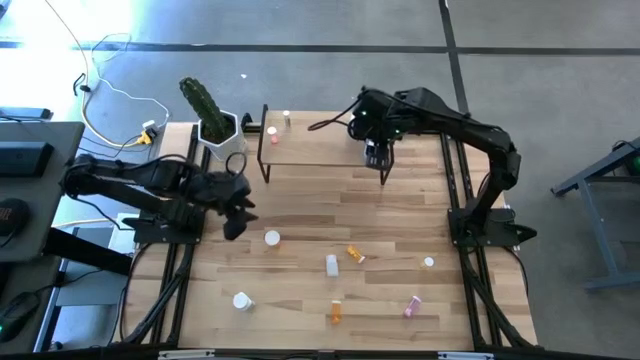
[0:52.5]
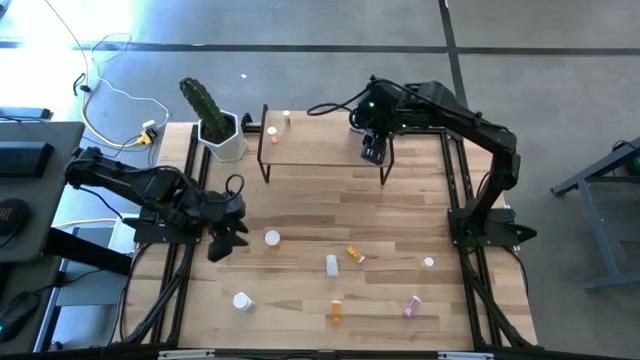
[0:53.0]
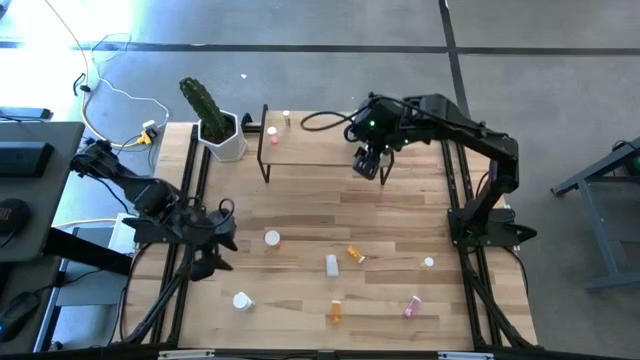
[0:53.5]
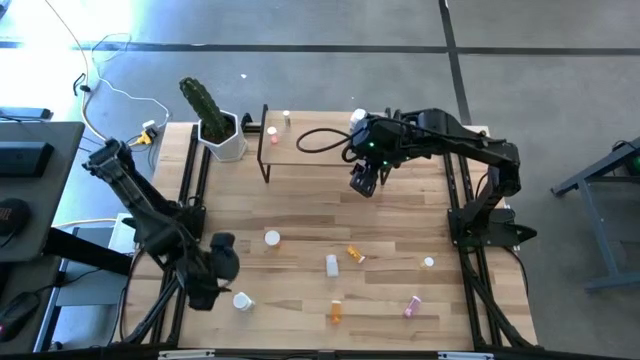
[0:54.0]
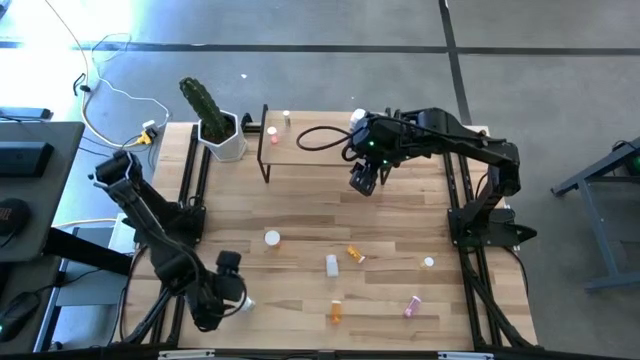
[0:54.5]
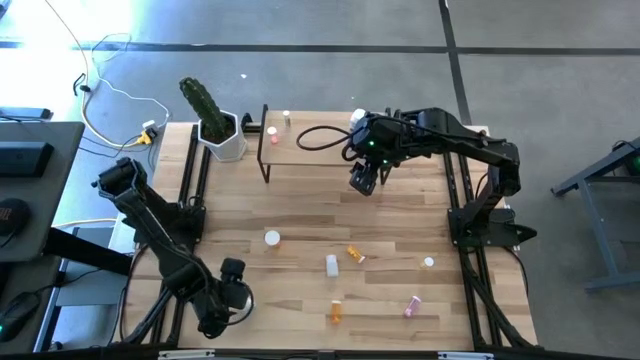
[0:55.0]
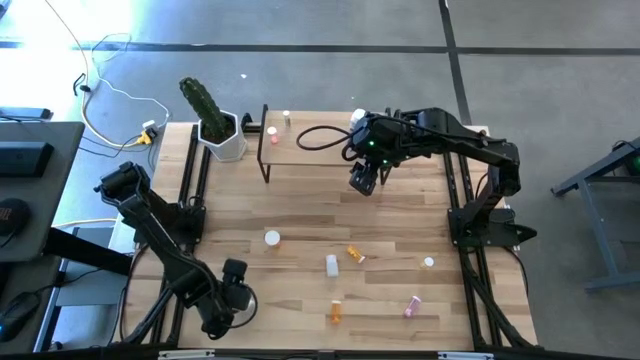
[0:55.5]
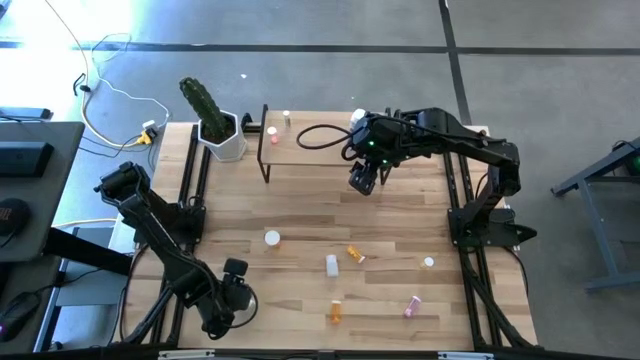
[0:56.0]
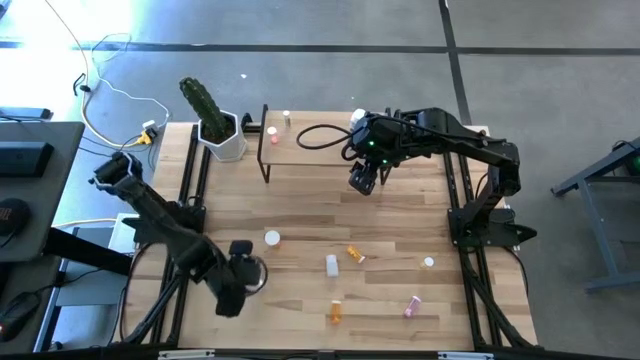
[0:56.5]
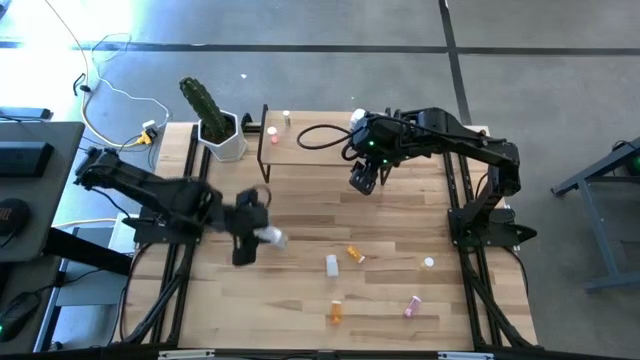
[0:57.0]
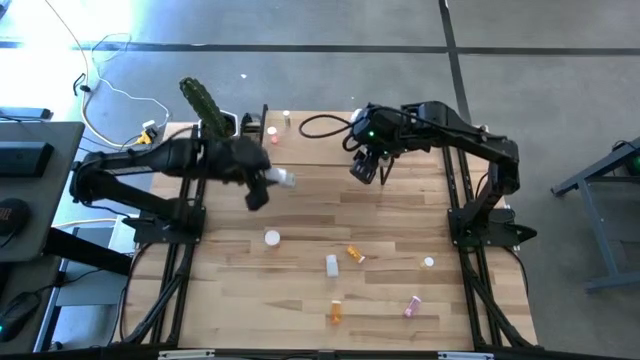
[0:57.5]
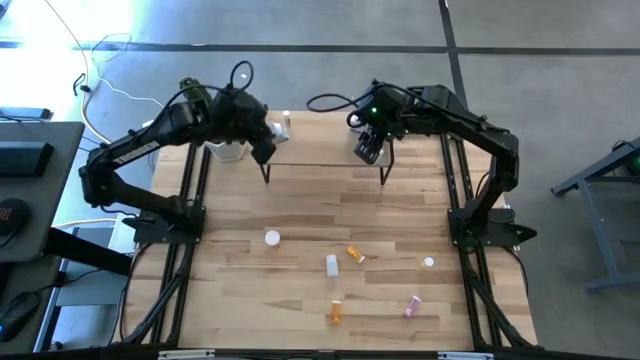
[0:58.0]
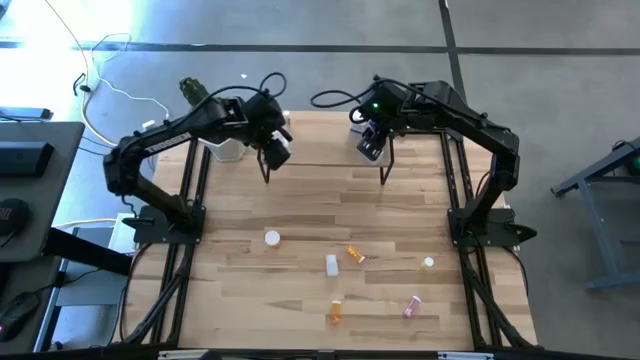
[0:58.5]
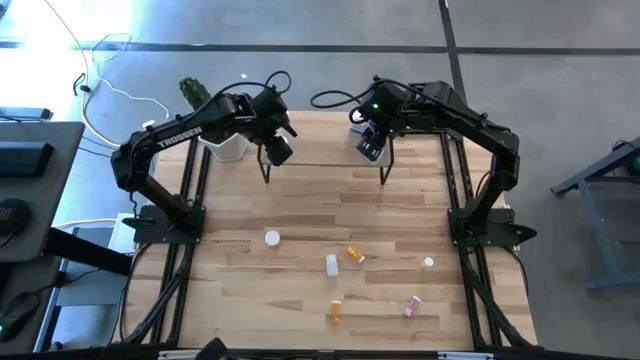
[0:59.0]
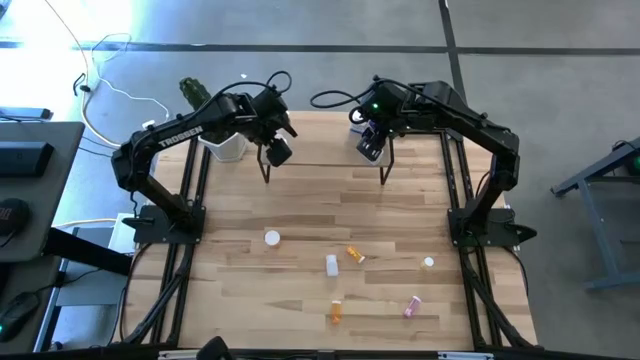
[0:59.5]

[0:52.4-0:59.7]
Task: Pick and place medicine bottles onto shelf by color
Put the blue pill bottle on the shelf

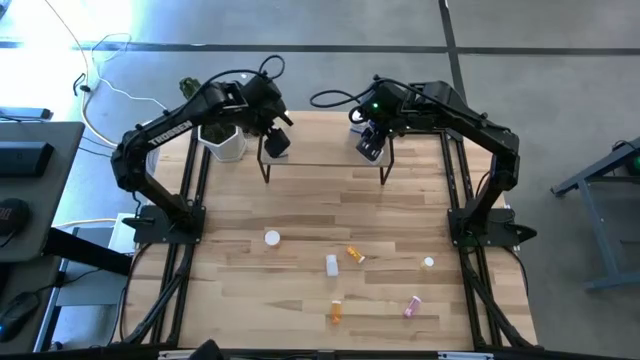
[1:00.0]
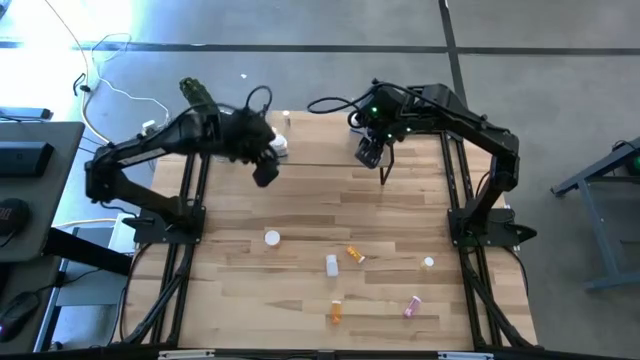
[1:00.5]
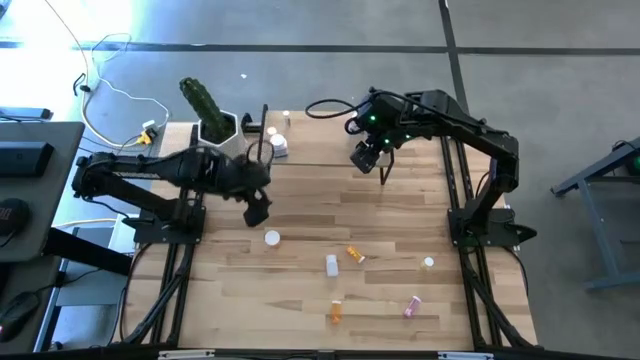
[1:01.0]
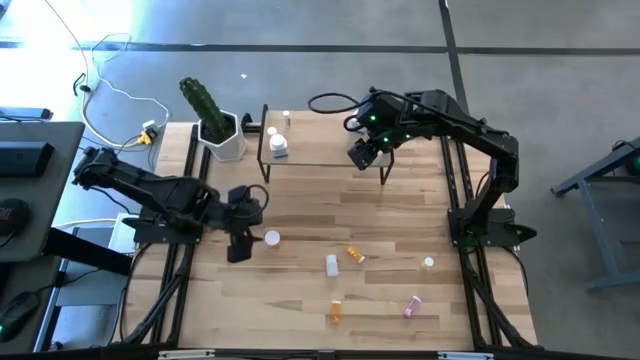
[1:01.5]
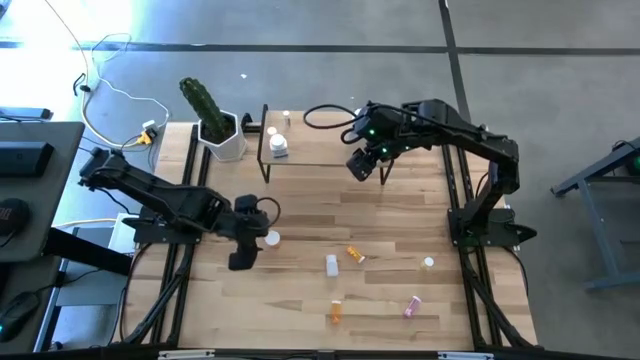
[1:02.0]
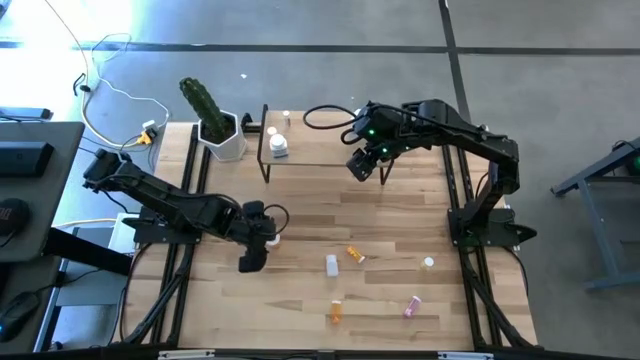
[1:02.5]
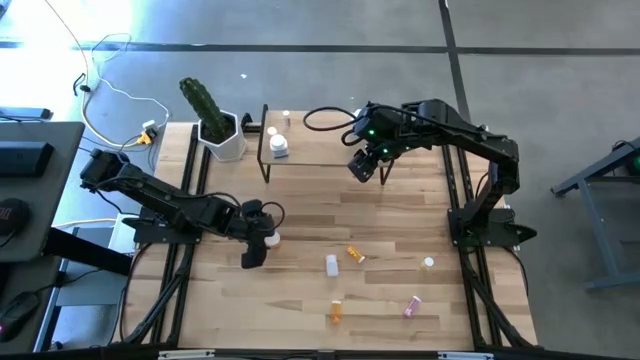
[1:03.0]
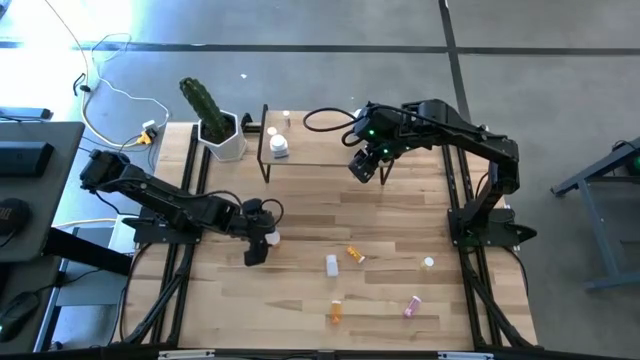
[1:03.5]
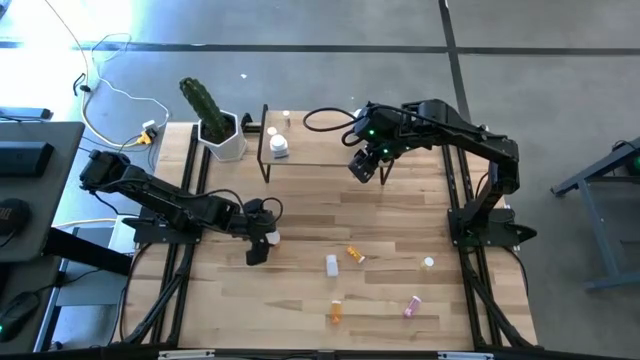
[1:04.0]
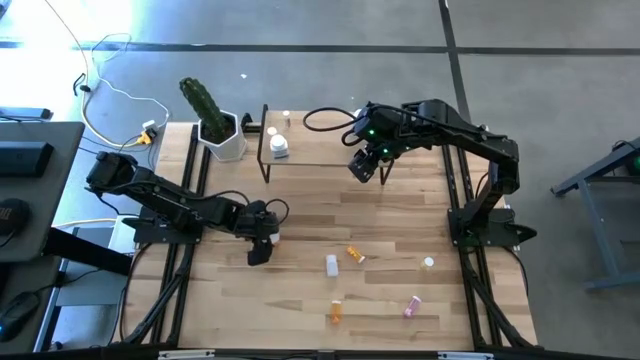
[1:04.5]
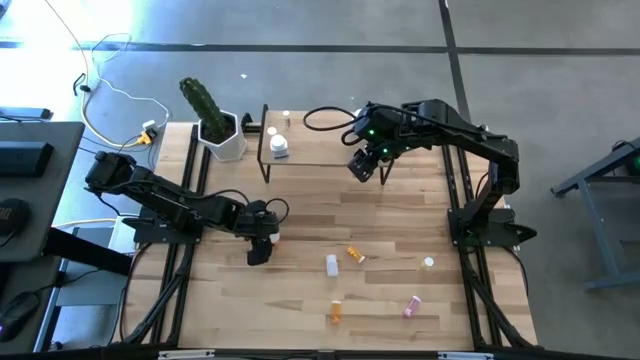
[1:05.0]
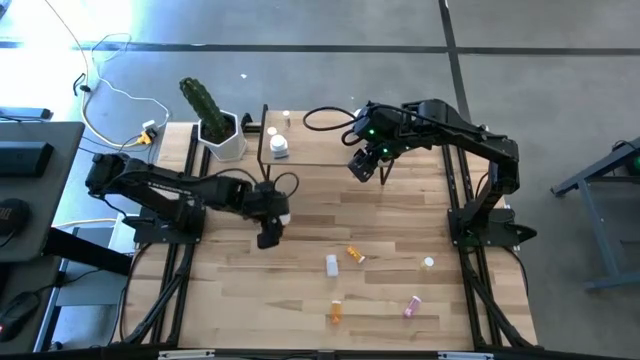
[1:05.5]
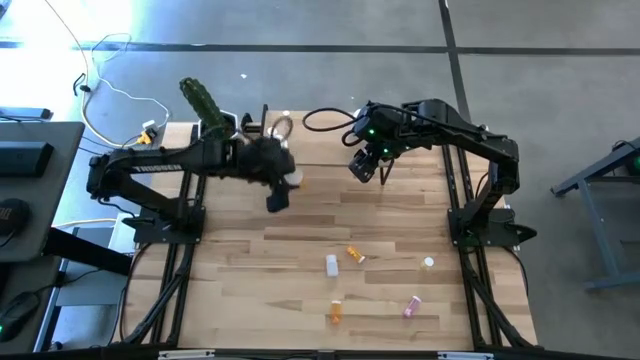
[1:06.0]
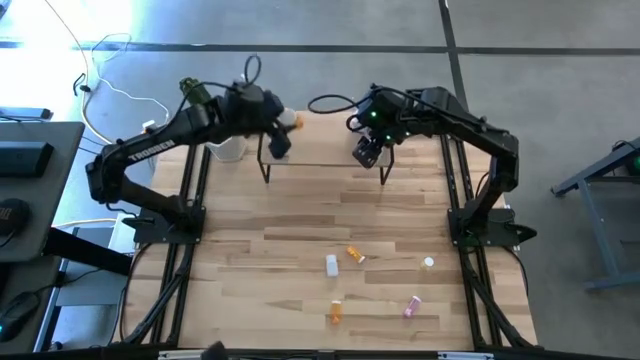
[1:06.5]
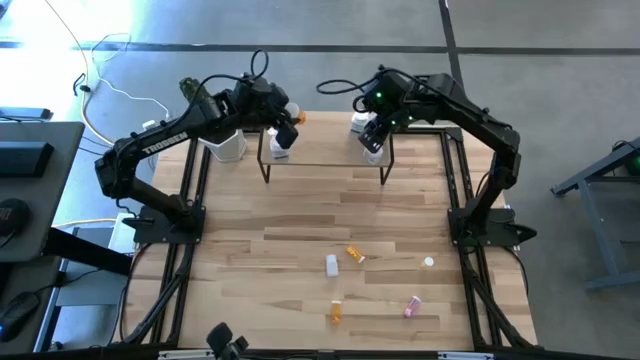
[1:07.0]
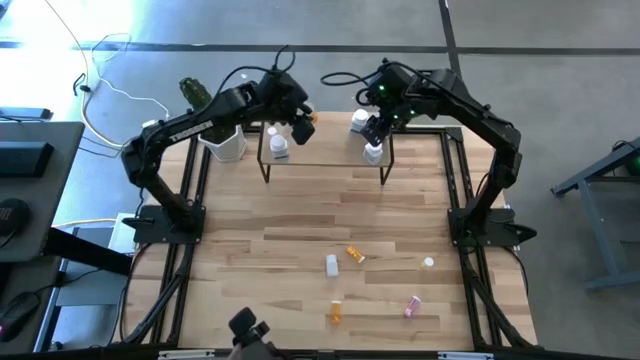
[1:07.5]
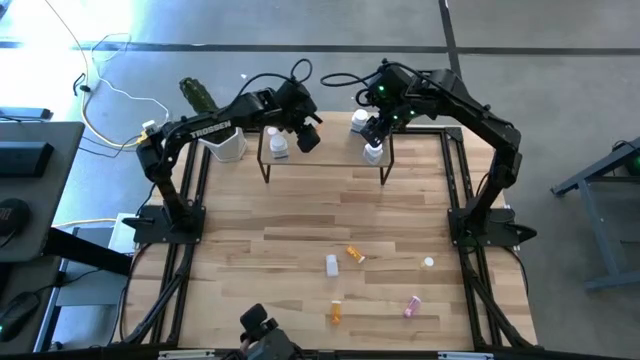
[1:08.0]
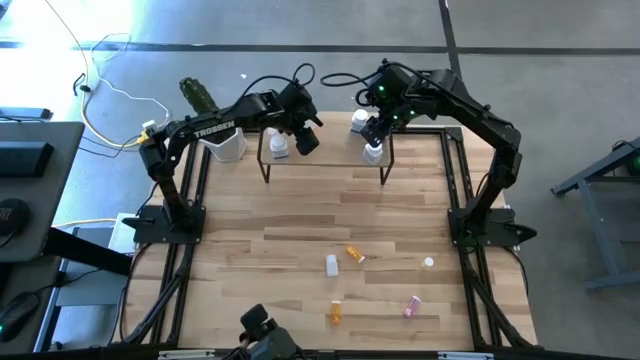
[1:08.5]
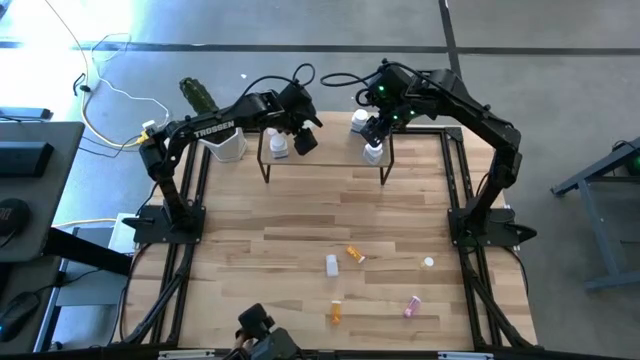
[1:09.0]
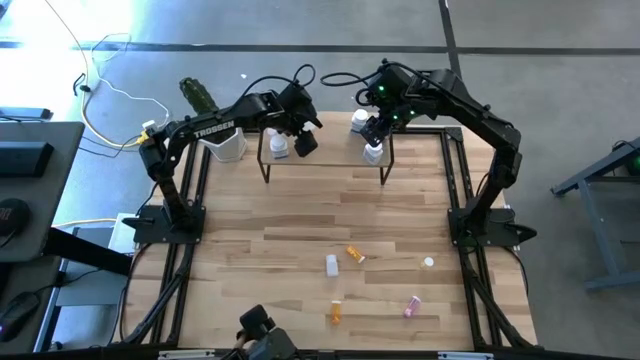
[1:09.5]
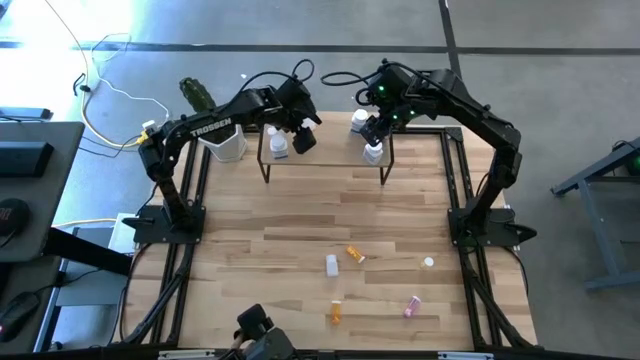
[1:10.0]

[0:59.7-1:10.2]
Put the big orange pill bottle on the shelf

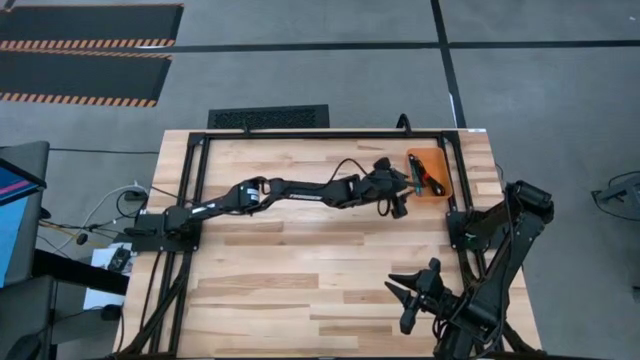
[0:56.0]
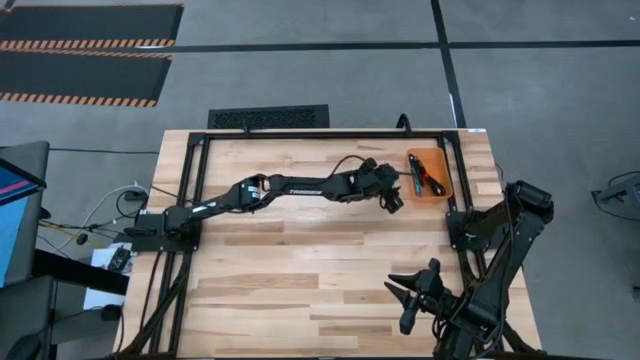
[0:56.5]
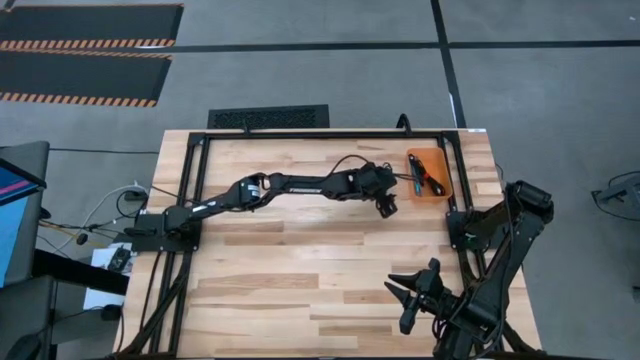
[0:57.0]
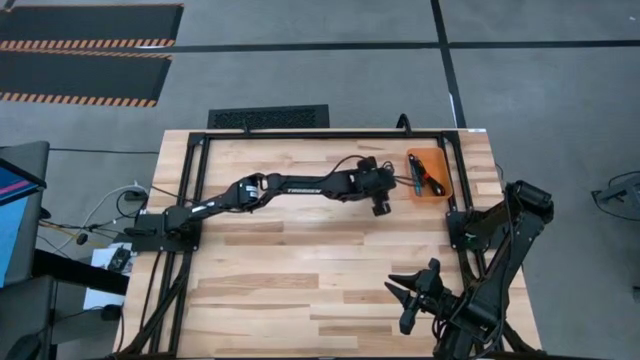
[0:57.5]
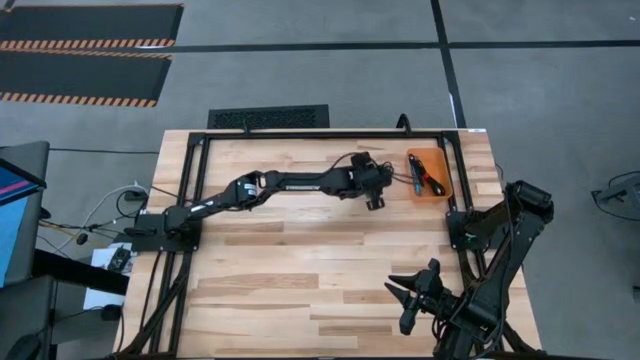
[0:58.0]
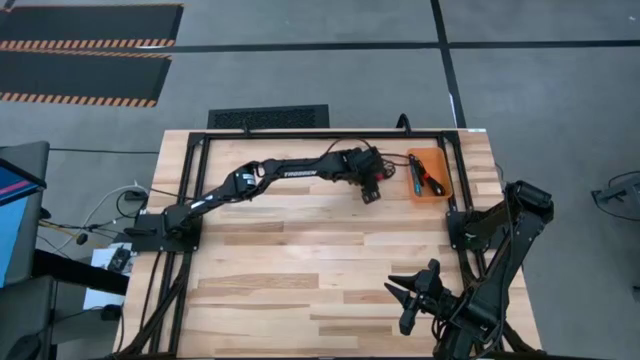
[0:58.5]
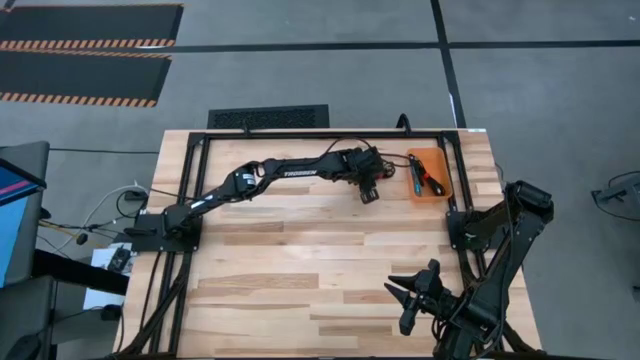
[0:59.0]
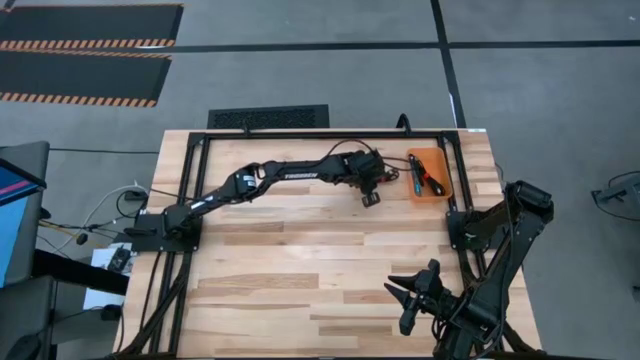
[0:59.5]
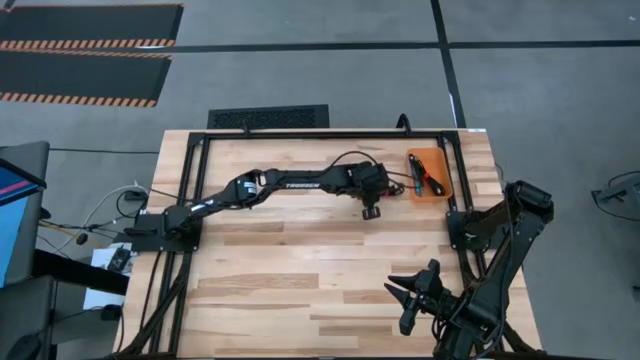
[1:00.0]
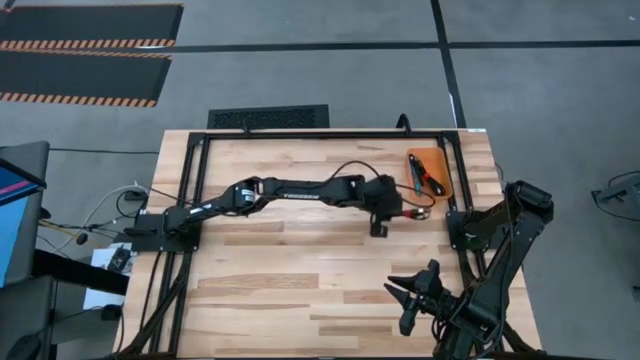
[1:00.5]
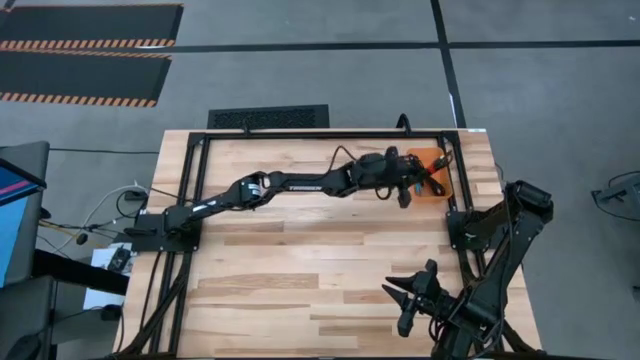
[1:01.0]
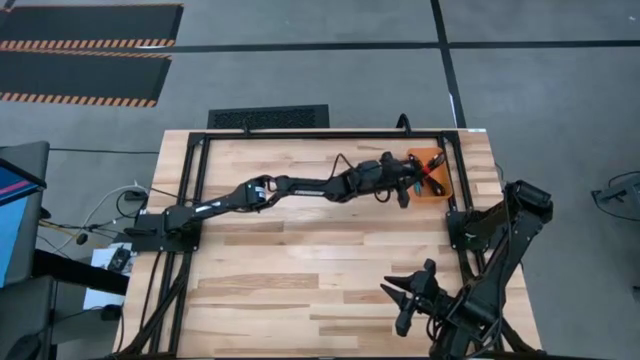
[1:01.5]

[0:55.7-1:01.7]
Task: Pick and place USB-C Cables
Put the black charger cable into the orange bin
